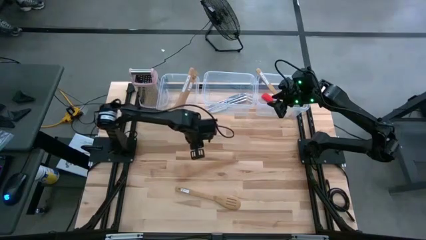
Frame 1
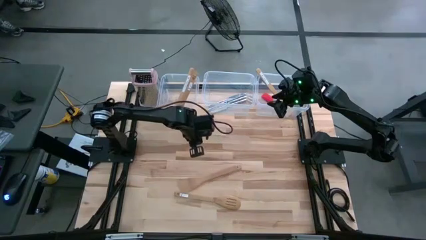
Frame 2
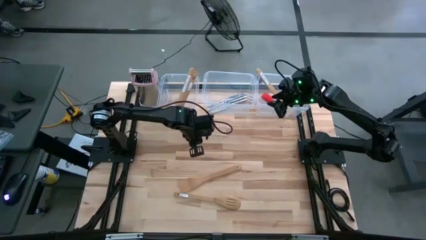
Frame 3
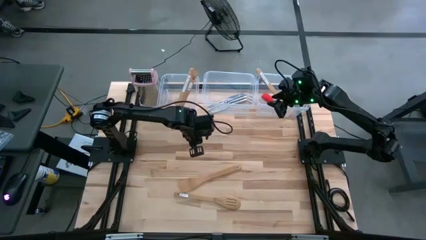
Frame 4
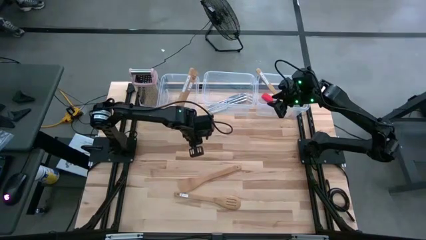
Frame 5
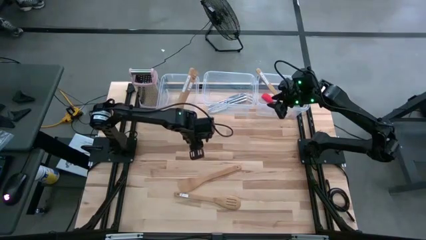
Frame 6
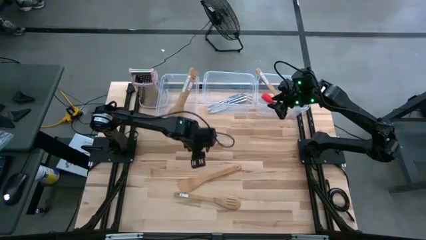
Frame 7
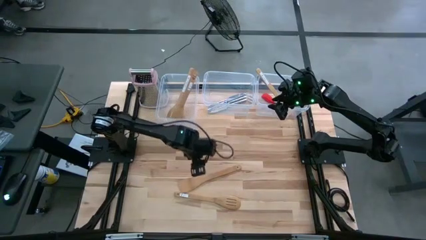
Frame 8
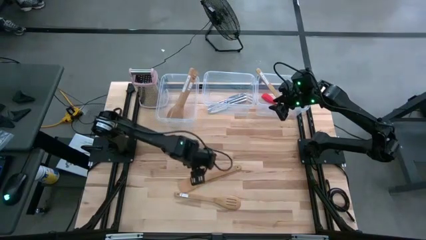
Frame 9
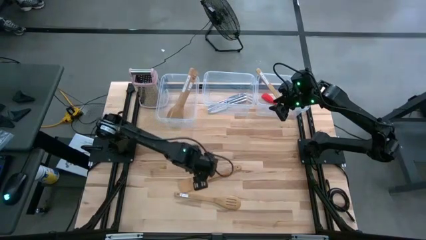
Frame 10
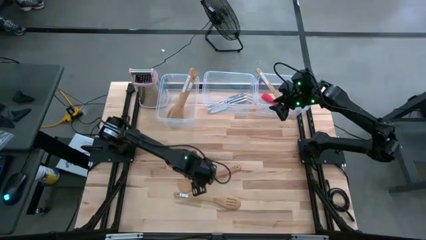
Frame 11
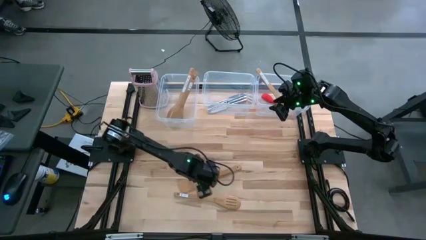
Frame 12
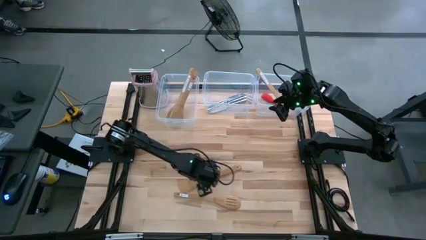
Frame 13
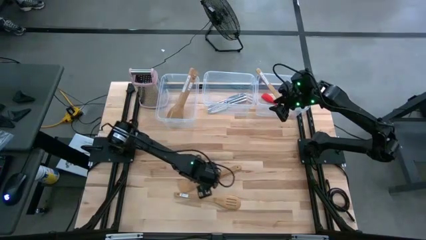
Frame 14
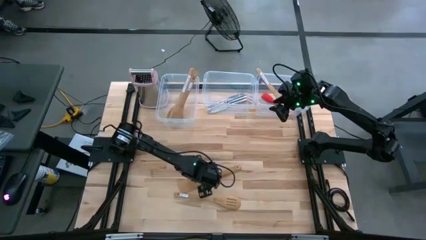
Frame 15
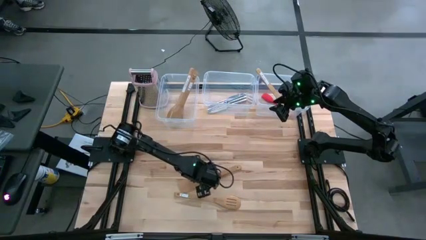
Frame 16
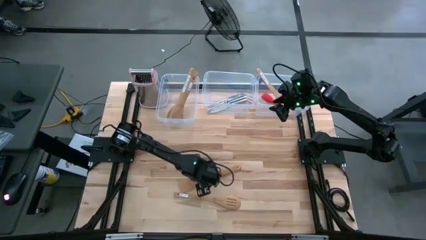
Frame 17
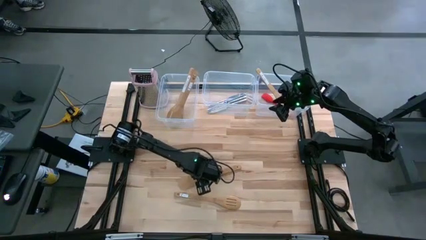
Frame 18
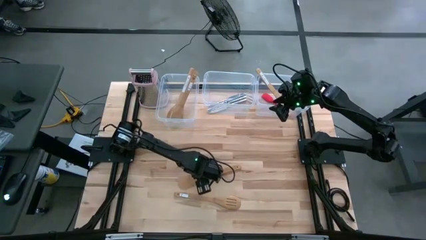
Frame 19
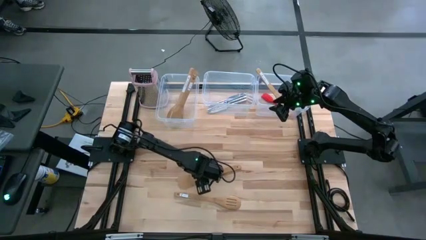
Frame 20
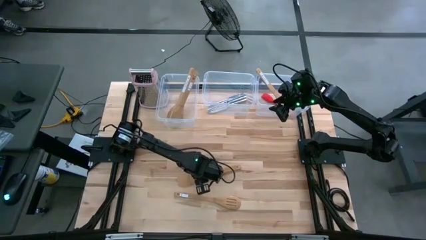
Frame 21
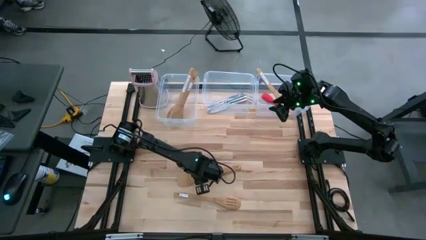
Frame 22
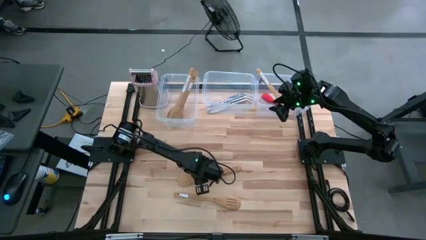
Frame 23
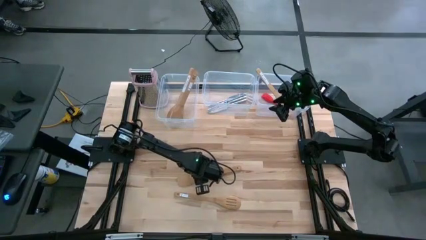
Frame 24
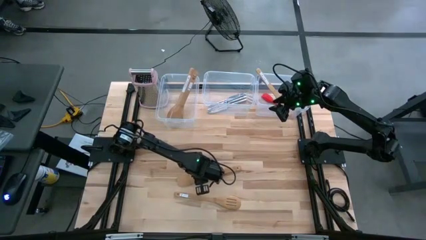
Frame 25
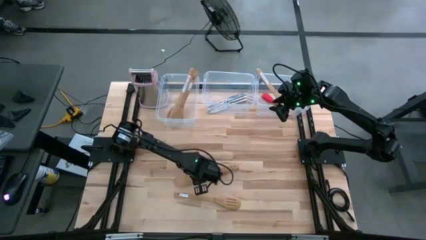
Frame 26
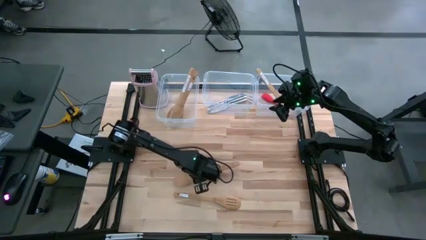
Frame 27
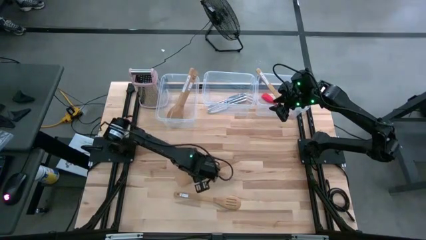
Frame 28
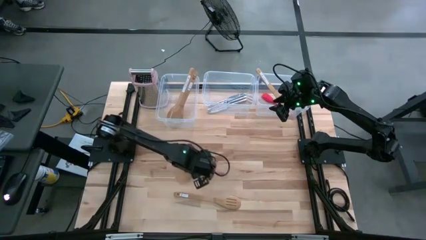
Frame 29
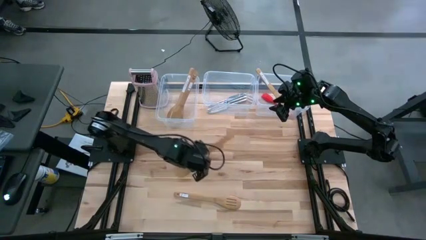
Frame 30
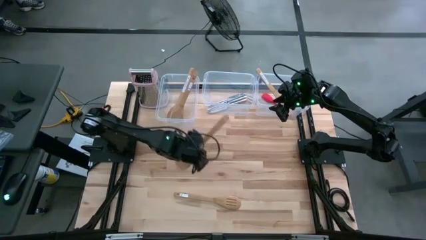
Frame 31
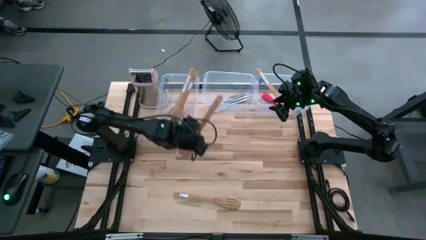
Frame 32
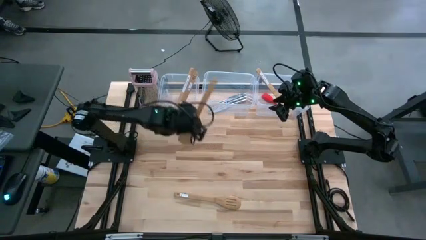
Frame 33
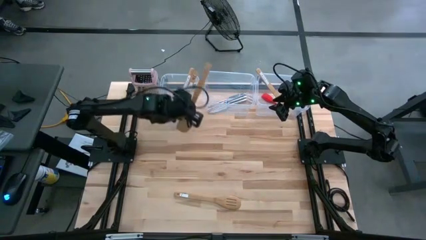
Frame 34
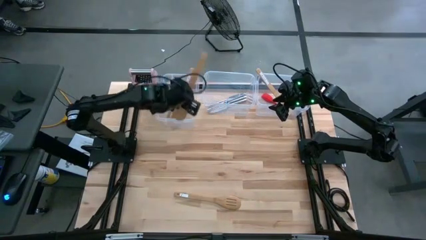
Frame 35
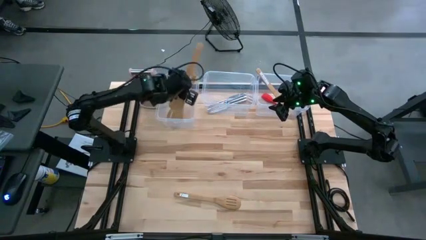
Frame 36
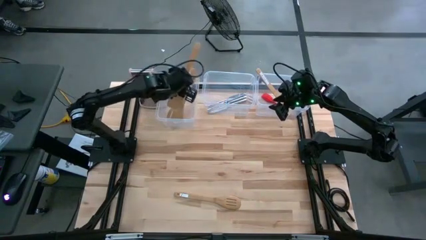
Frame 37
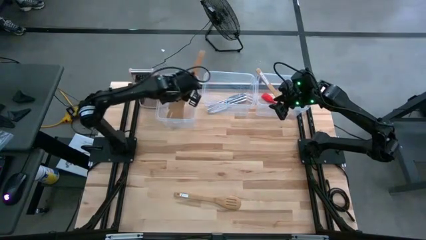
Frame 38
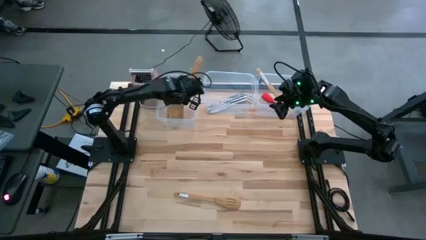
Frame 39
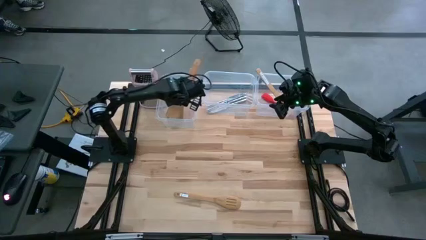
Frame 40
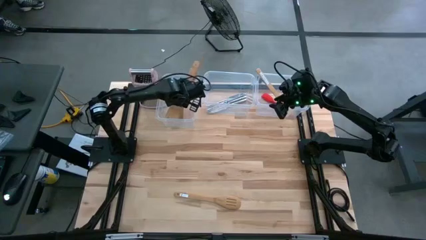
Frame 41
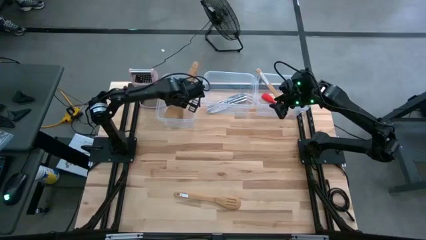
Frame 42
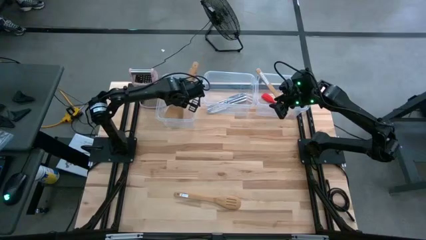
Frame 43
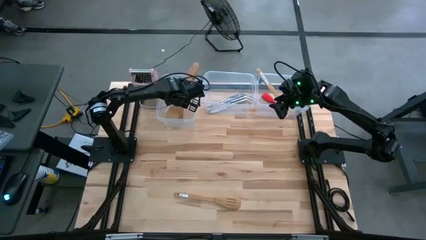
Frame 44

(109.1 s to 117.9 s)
Task: Pick & Place Kitchen Items
Put the brown serving spoon into the left transparent container

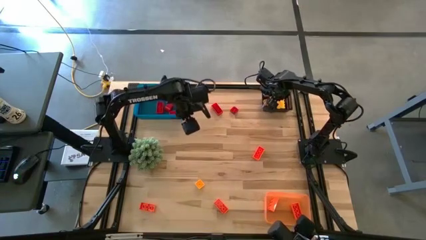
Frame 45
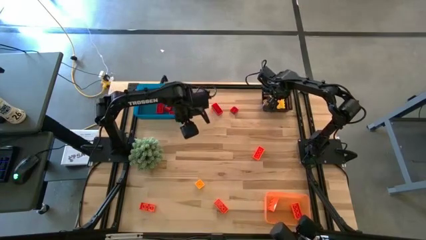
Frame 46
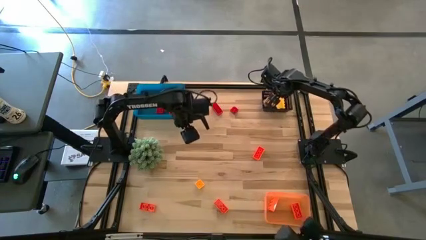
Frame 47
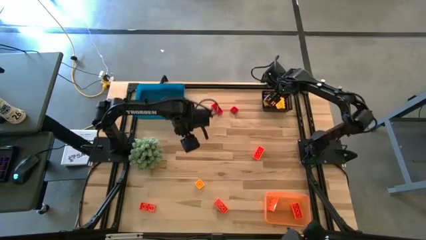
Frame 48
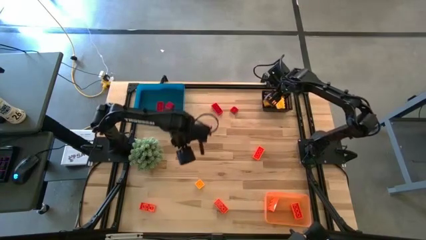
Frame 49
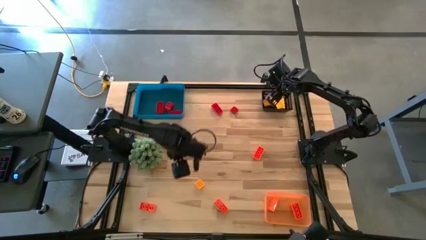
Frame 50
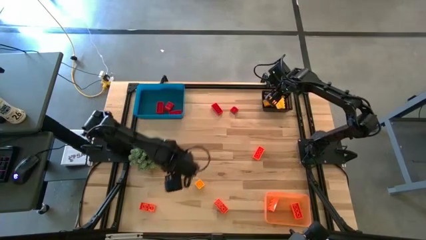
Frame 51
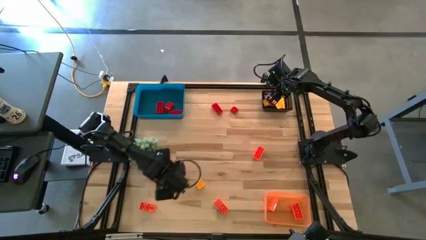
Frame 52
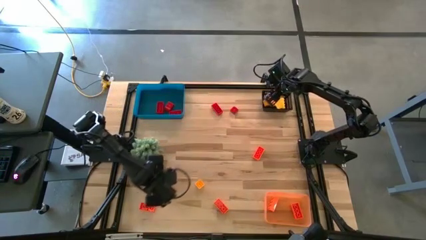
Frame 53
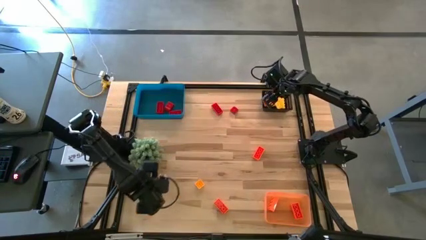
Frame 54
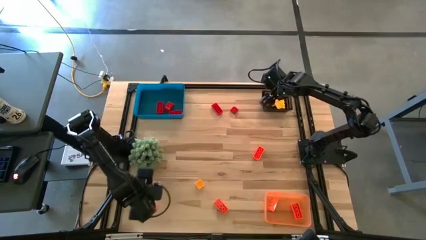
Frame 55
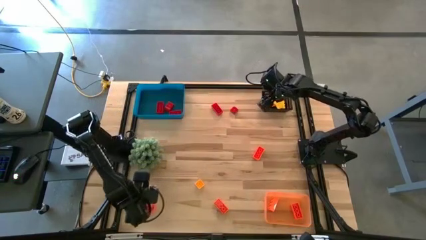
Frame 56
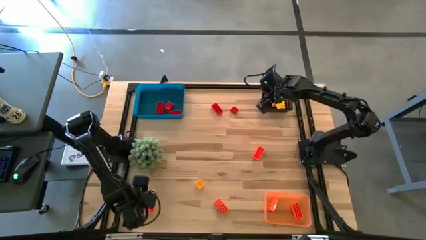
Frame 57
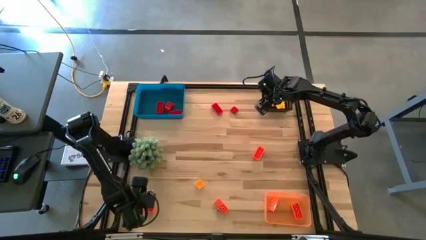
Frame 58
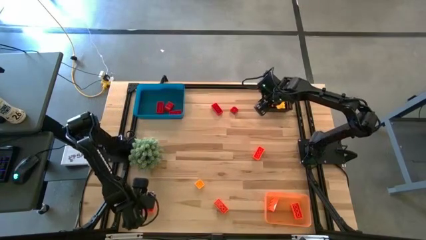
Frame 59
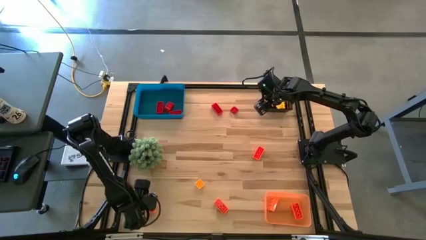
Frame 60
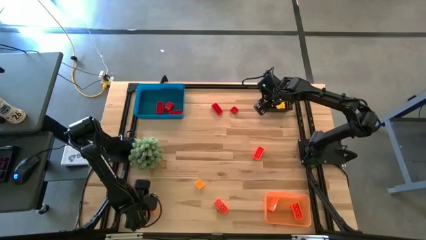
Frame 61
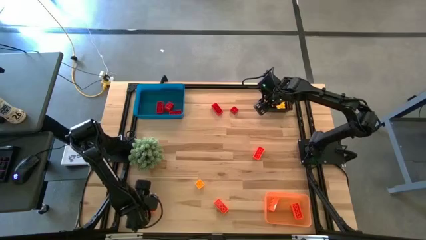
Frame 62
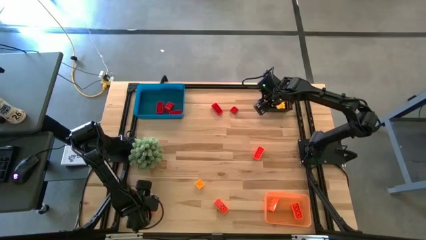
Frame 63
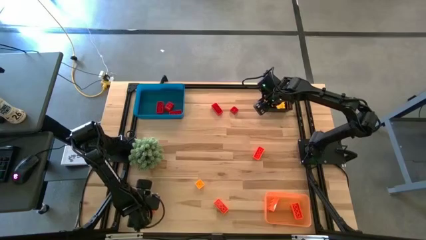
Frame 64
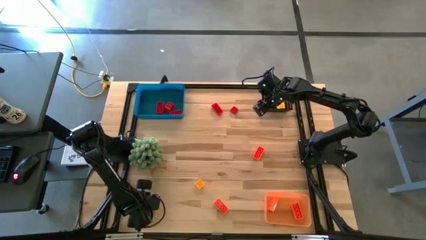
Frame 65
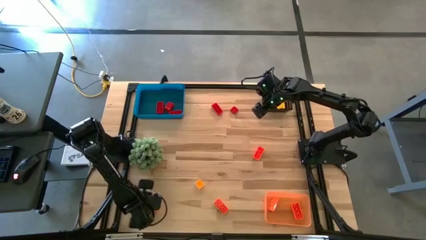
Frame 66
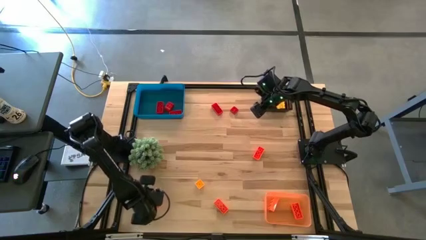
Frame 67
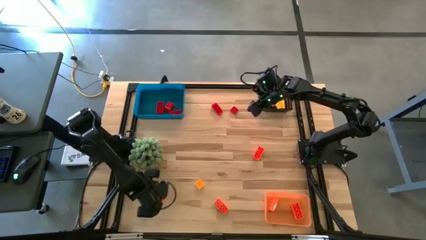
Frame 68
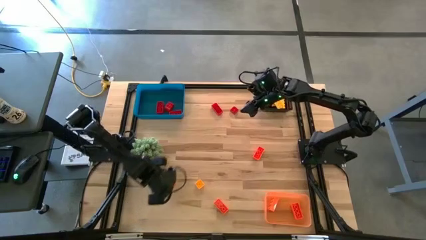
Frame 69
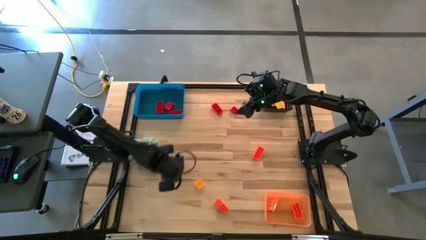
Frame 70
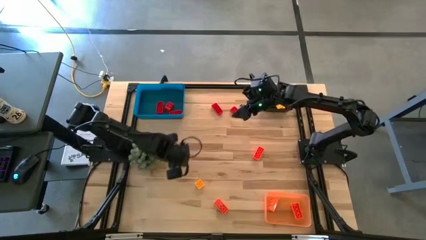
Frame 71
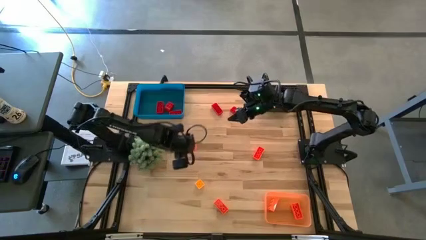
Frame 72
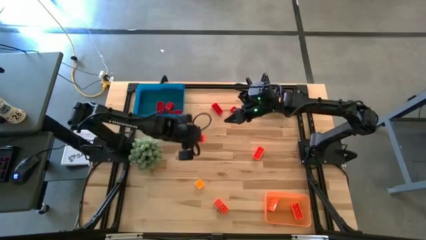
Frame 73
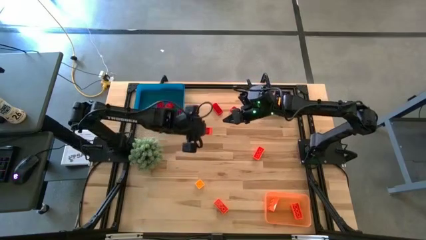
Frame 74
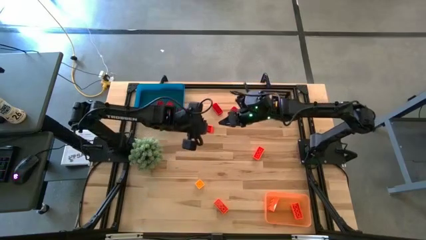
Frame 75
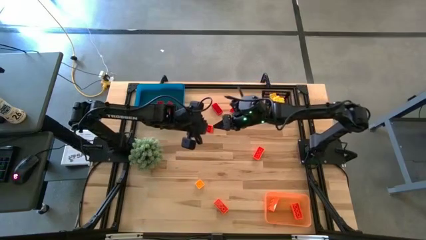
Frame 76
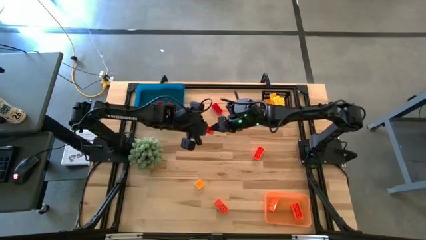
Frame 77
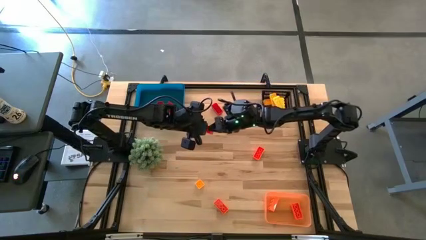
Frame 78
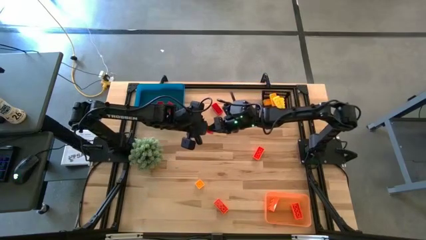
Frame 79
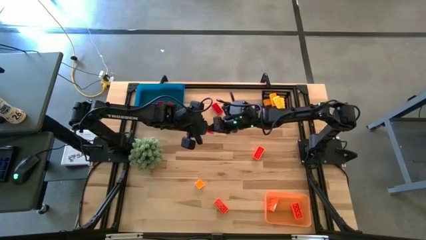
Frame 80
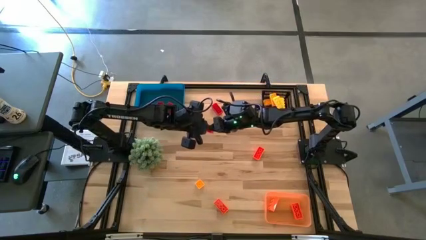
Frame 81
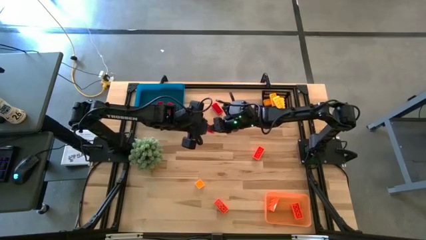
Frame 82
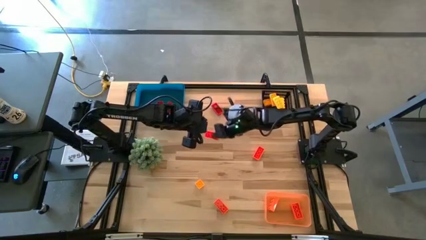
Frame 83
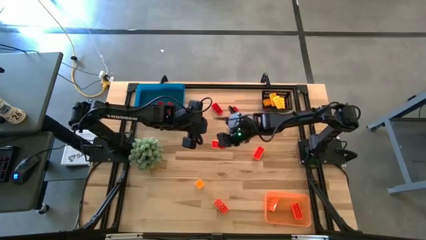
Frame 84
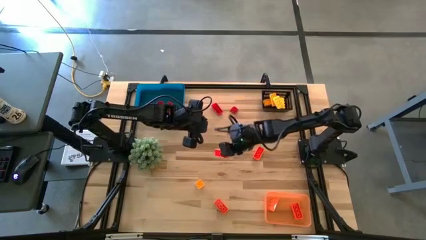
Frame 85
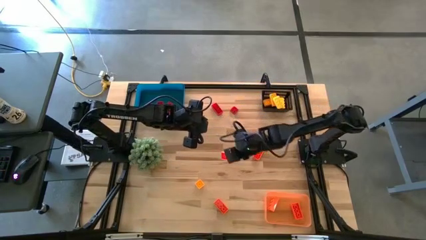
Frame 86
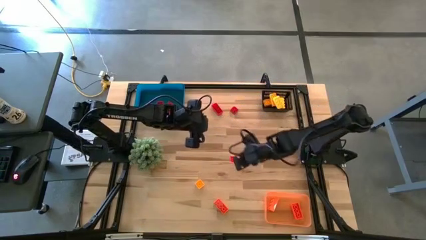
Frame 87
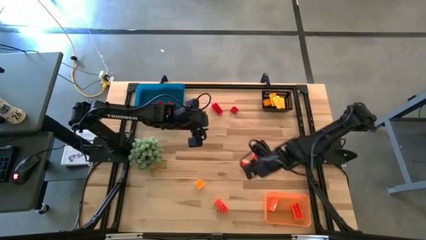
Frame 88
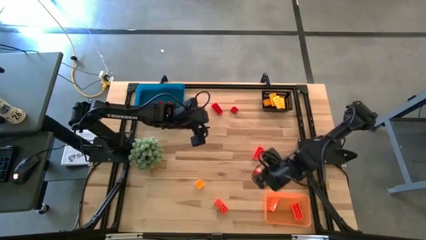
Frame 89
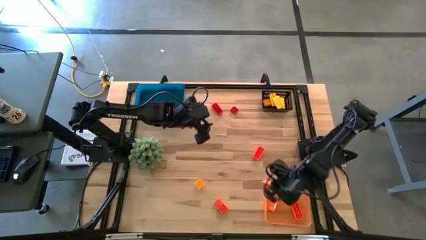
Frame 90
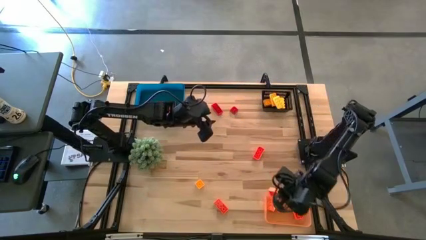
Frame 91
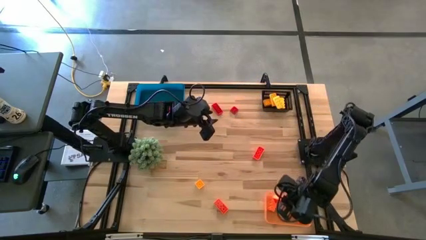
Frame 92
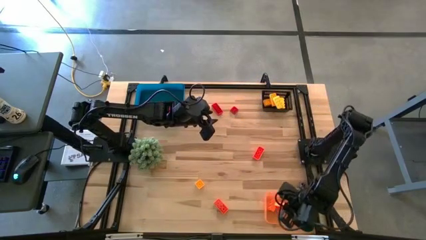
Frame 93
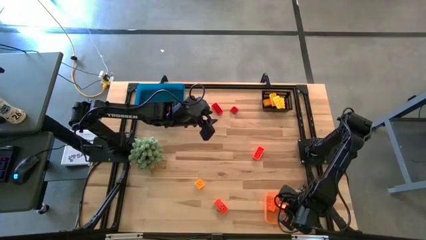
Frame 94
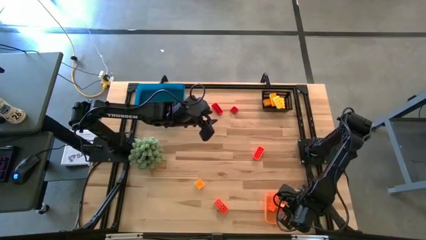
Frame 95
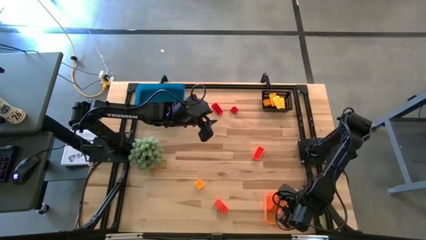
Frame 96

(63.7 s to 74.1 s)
Task: Sort & place blocks by color
Put the orange game piece into the orange bin
